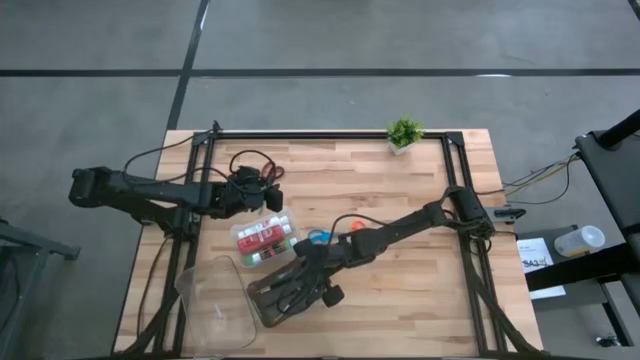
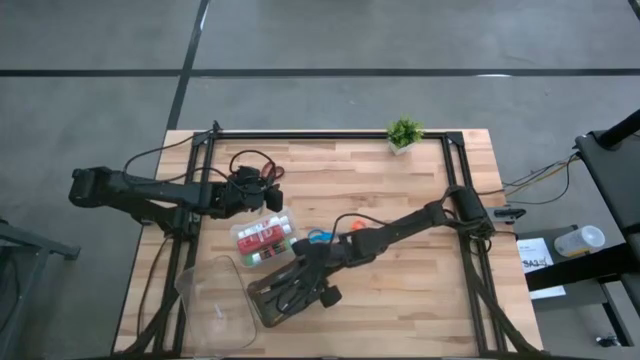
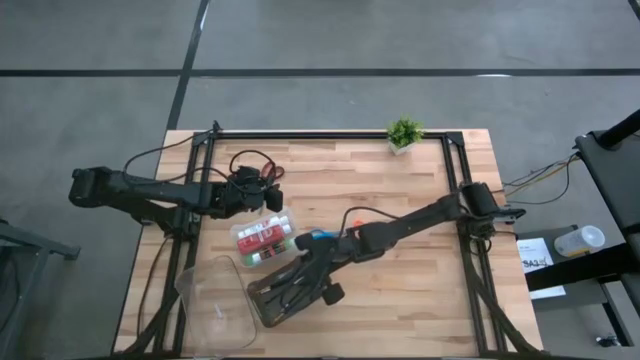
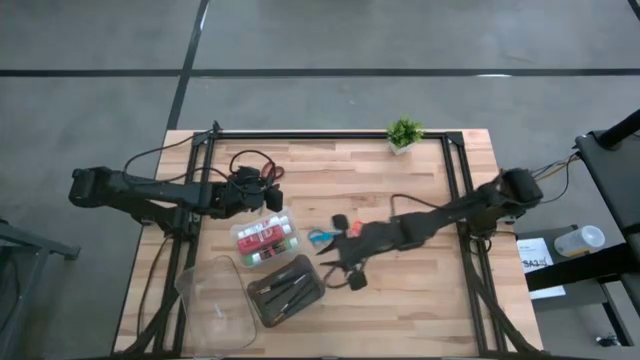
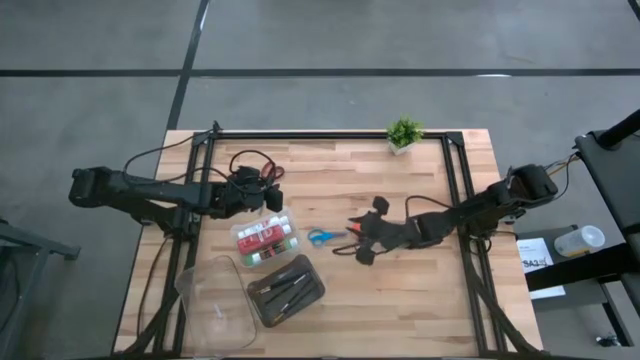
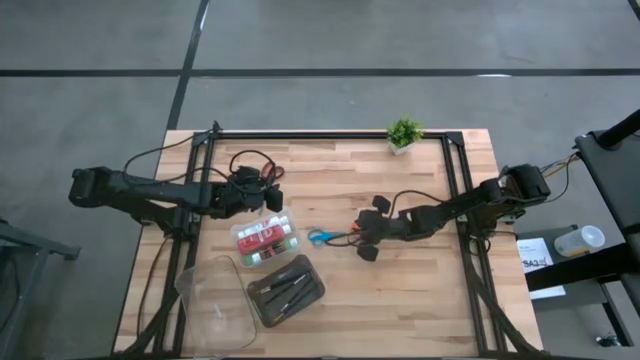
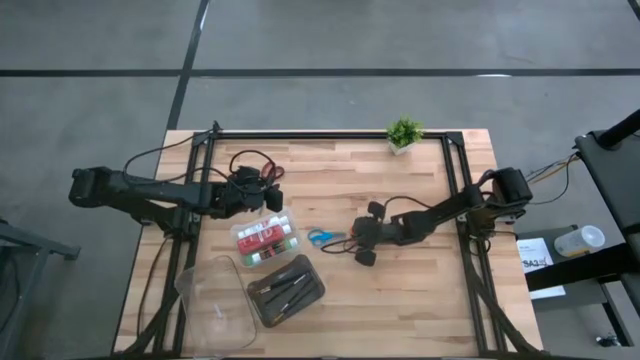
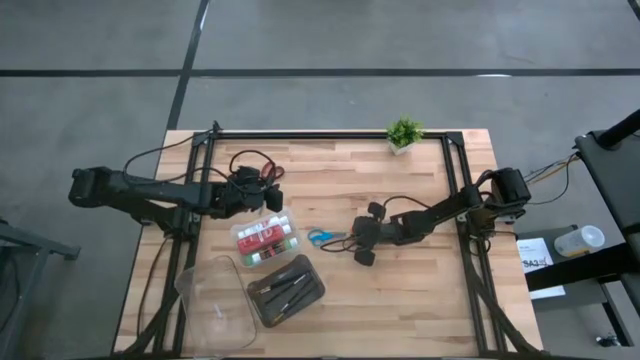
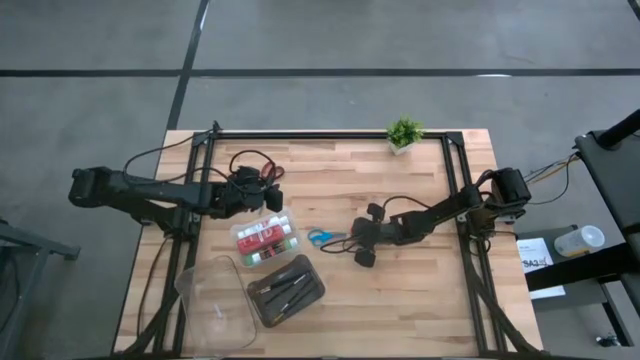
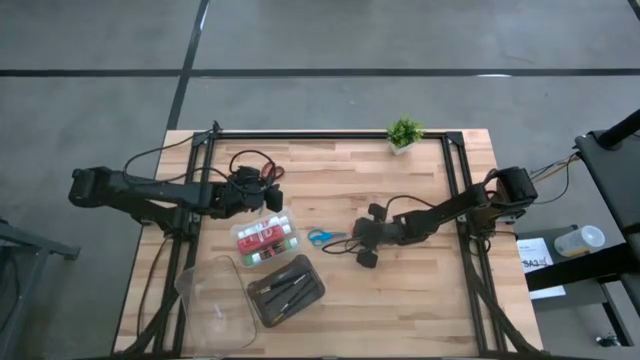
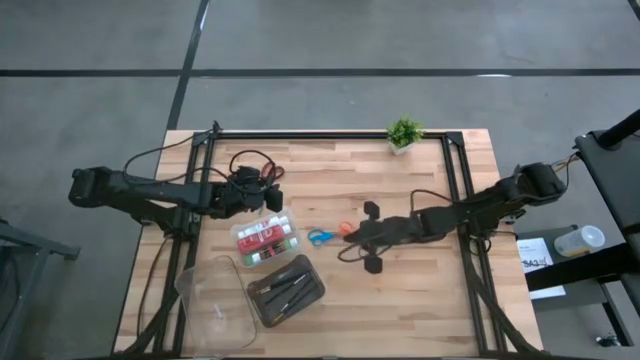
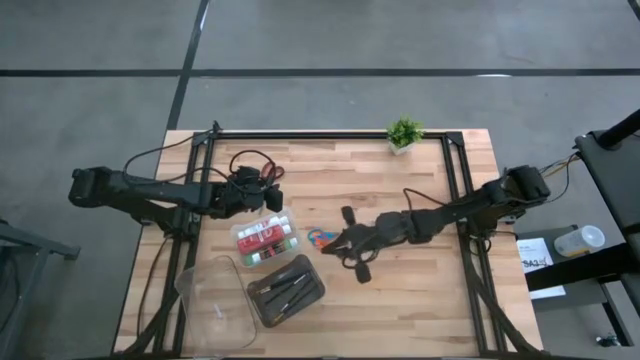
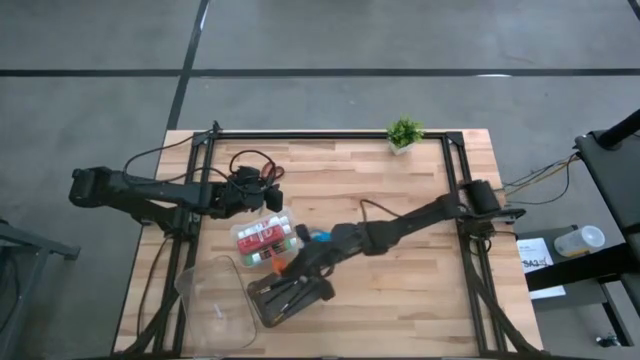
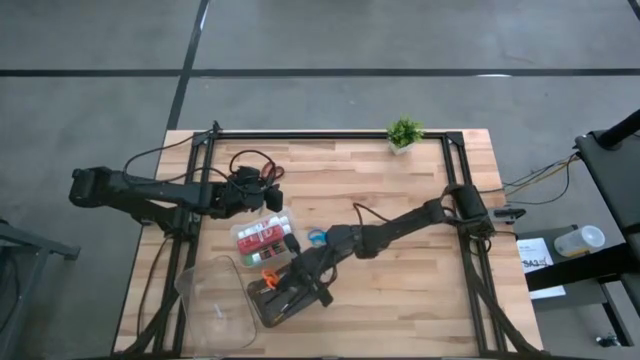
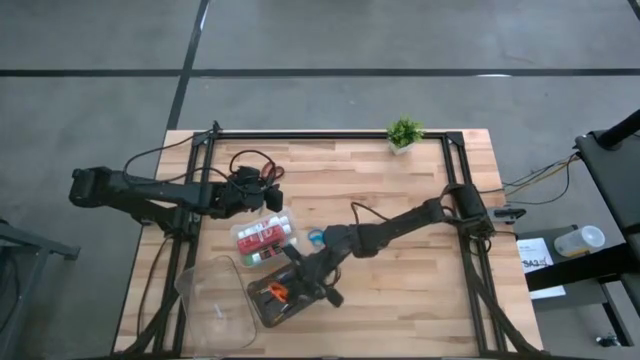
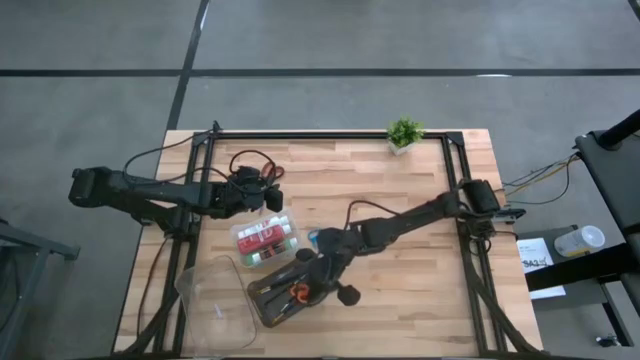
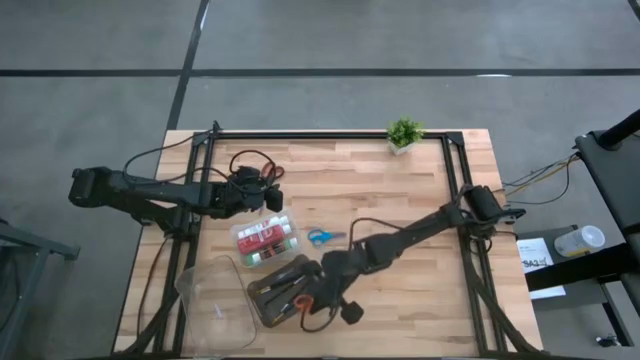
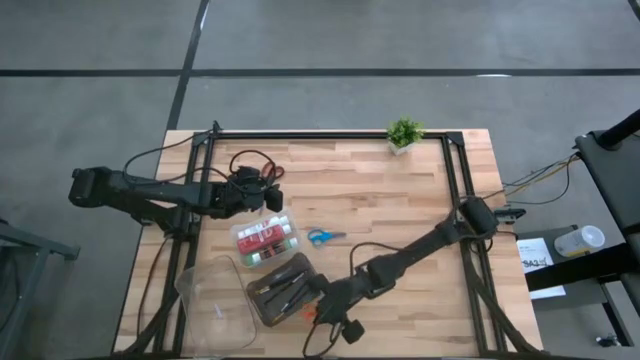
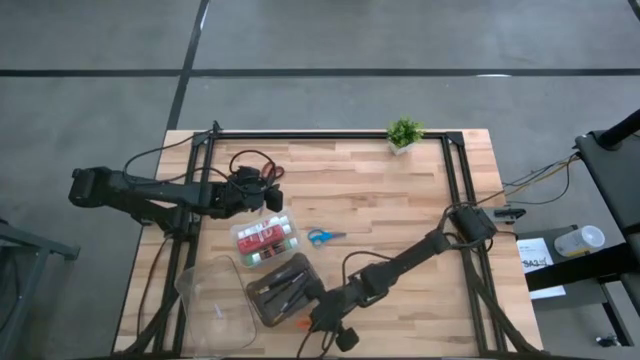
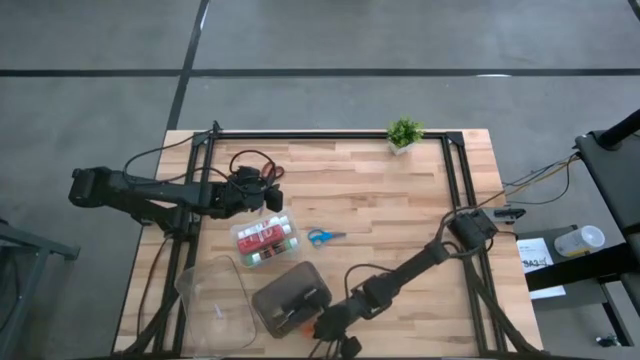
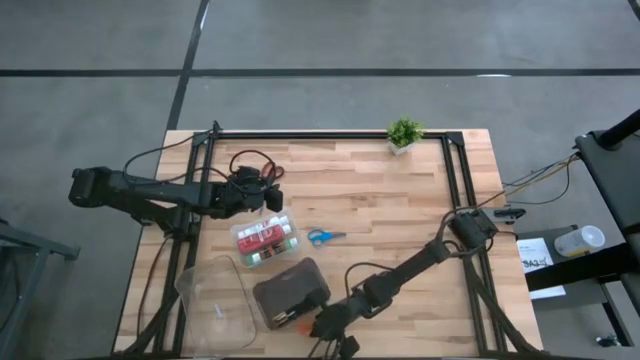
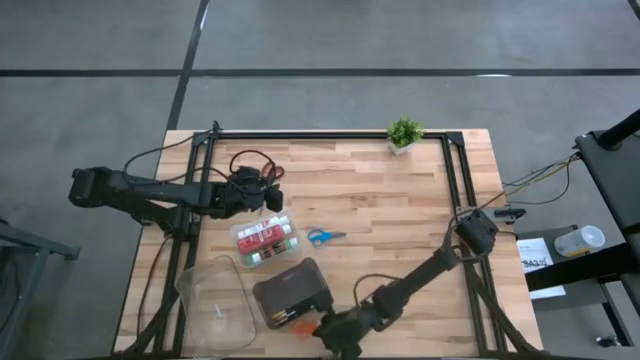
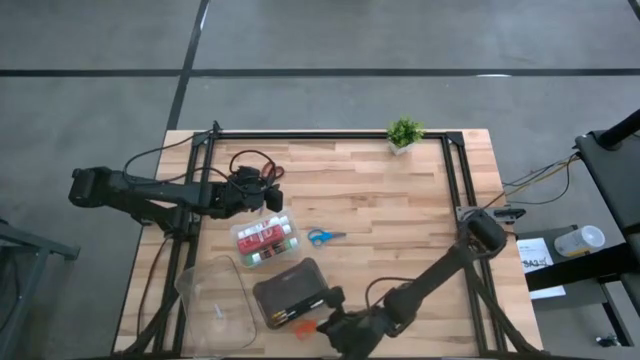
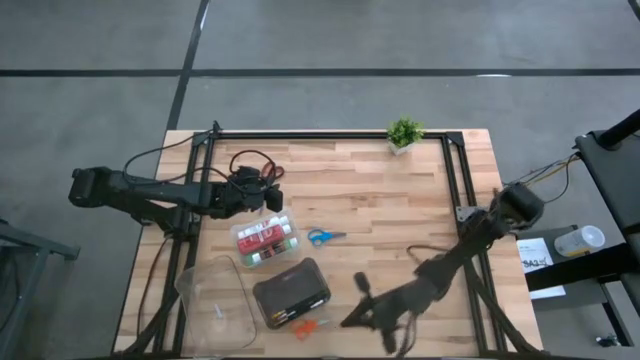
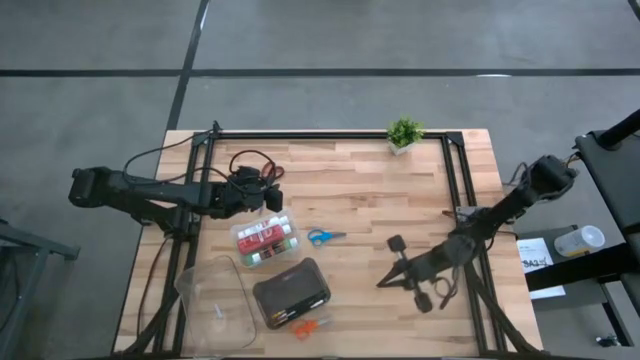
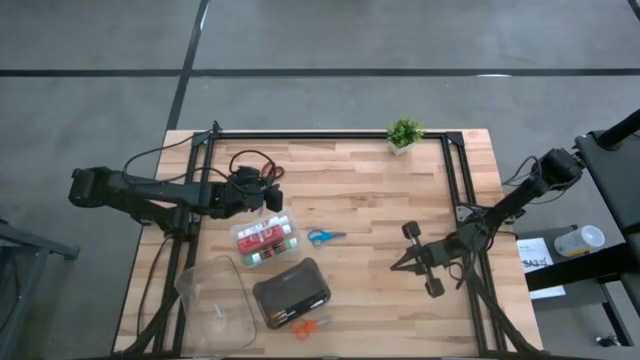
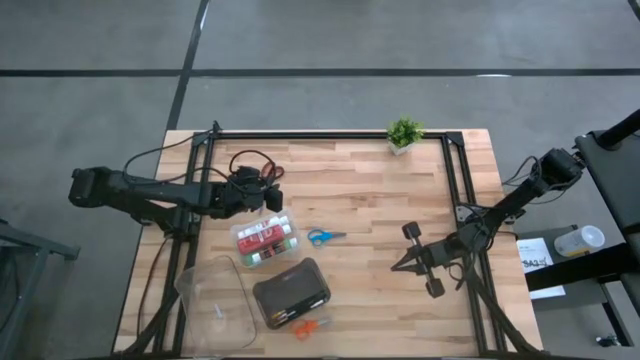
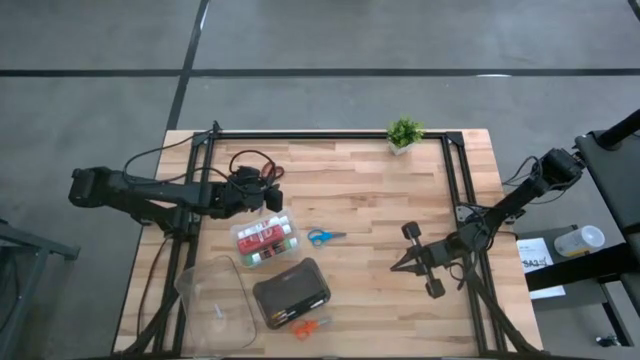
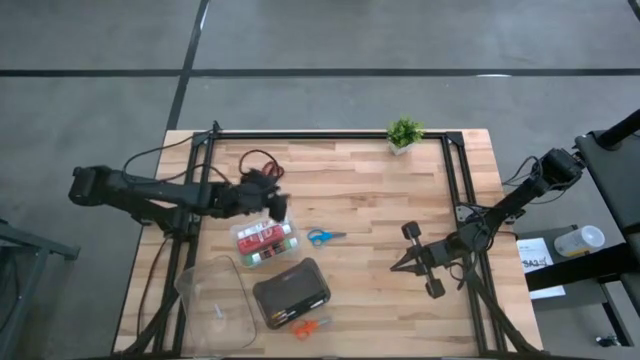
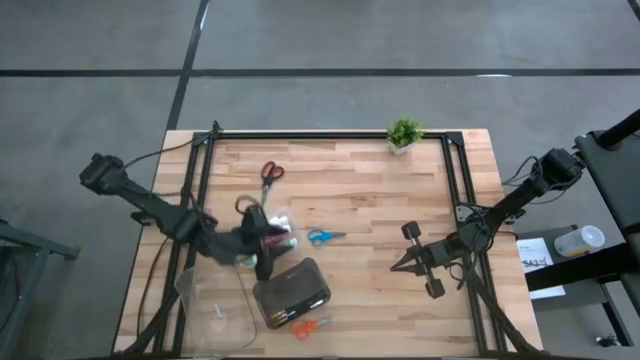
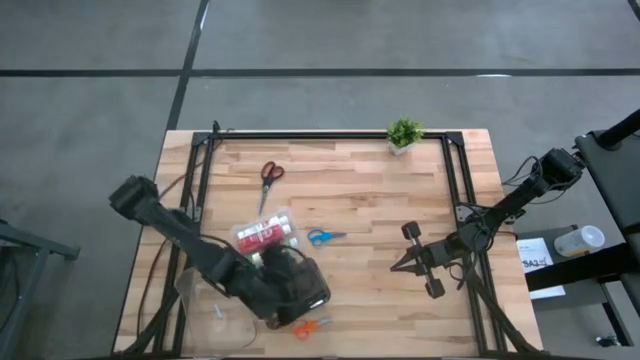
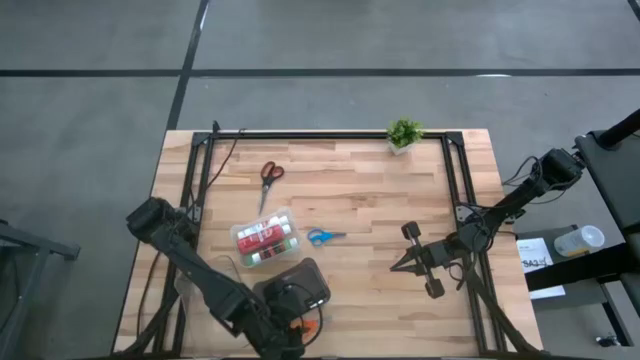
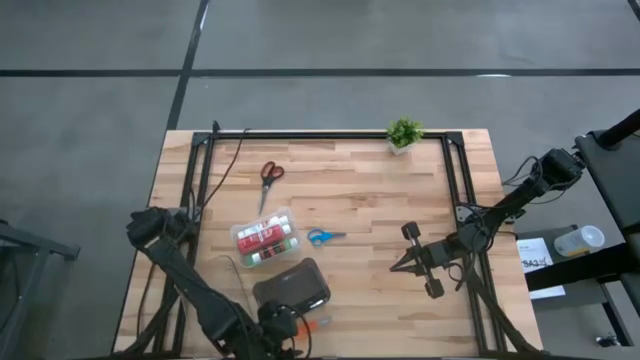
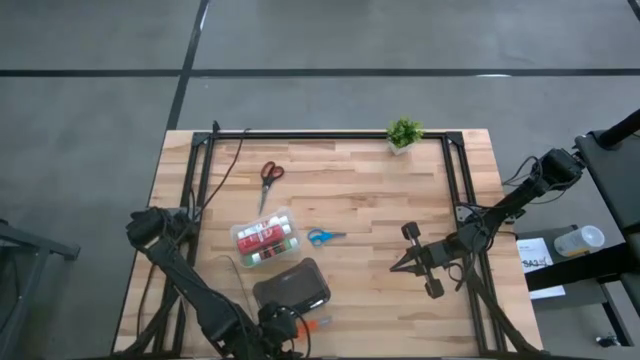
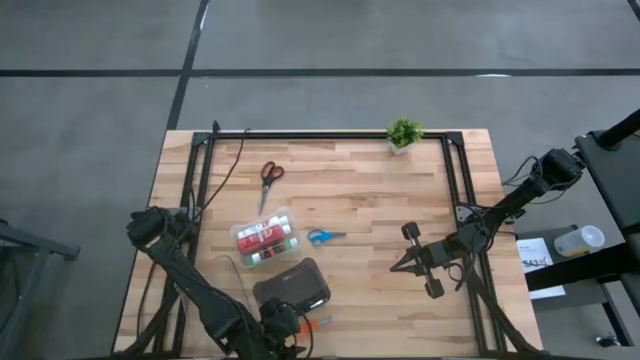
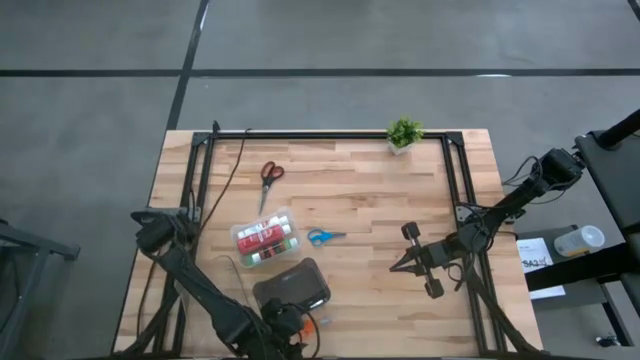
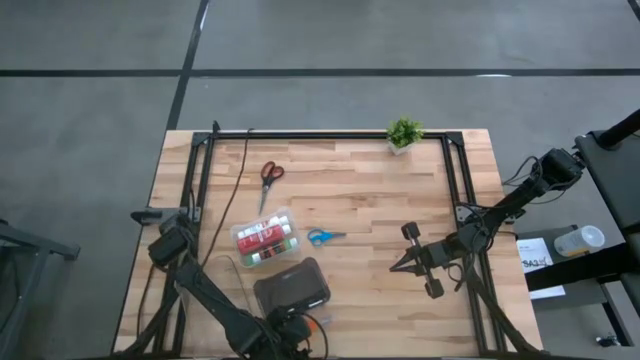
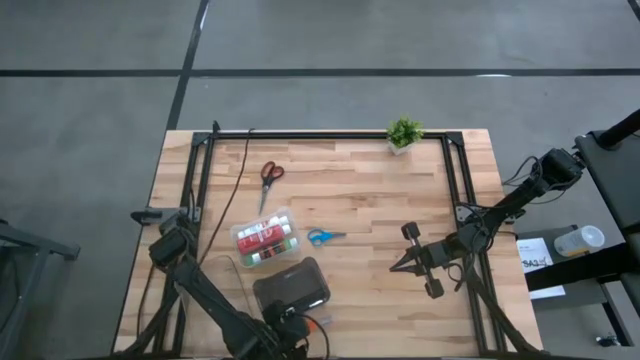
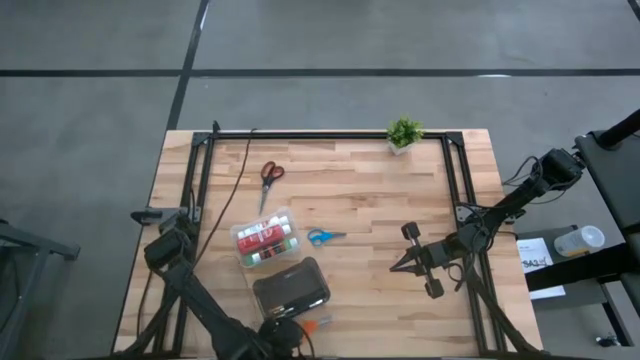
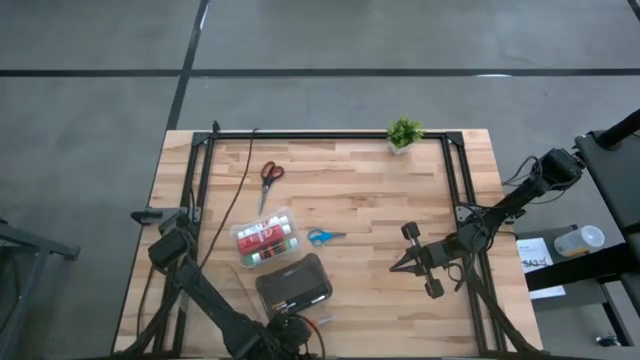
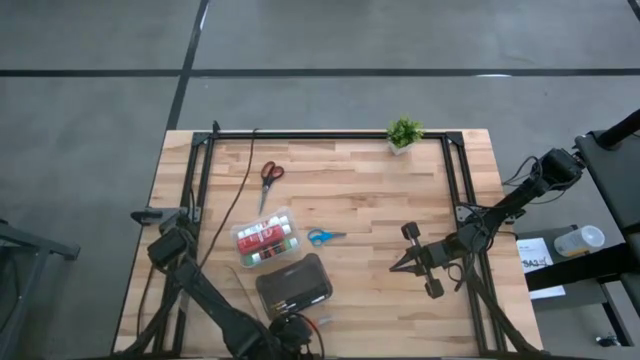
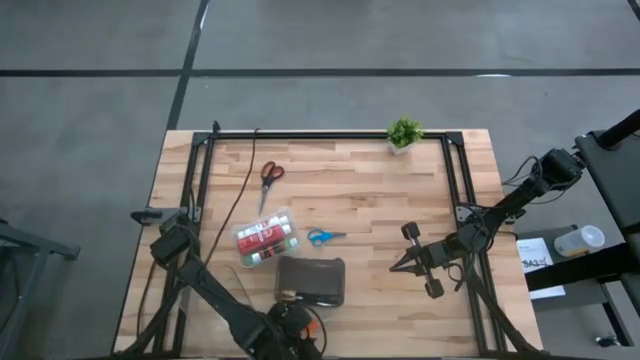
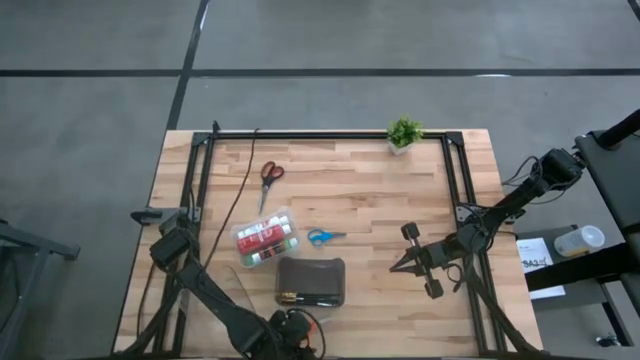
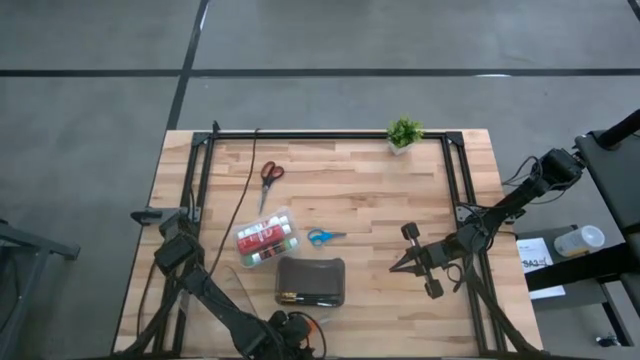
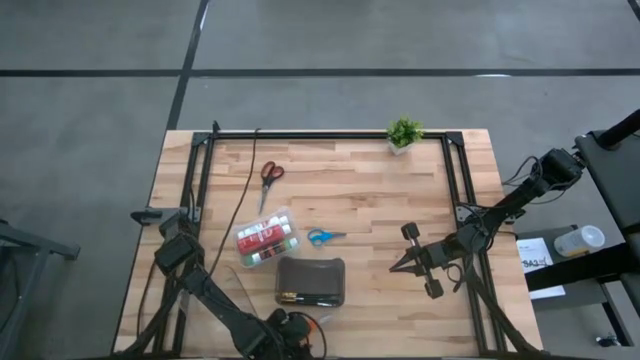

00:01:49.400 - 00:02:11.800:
Task: Pick & Place Paint Supplies
Put the orange scissors into the bottom transparent bin
